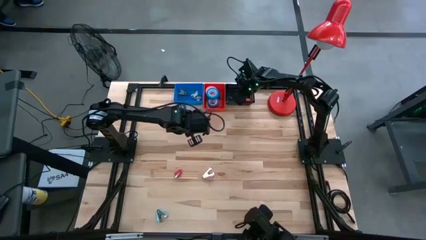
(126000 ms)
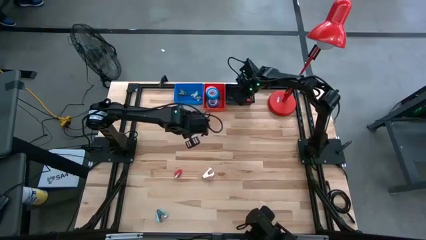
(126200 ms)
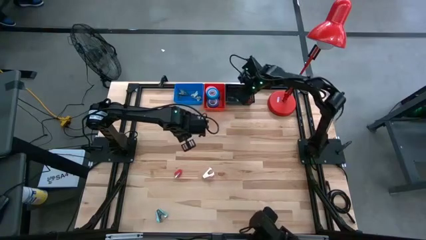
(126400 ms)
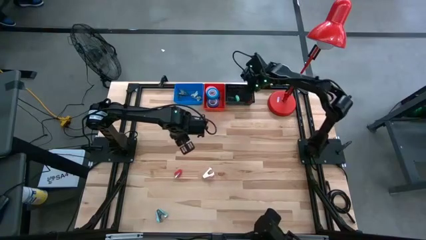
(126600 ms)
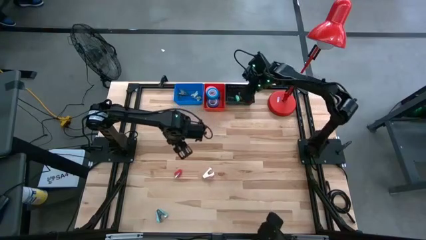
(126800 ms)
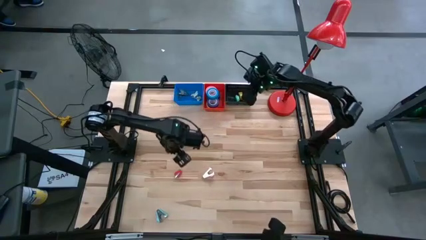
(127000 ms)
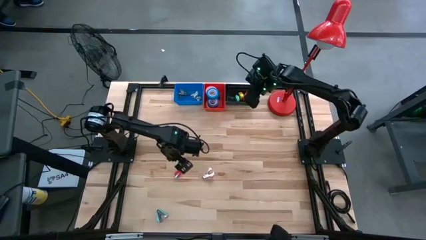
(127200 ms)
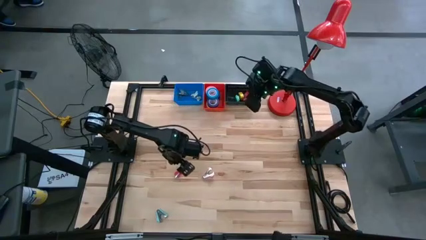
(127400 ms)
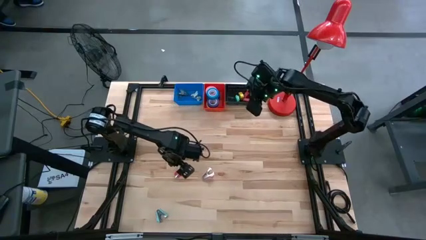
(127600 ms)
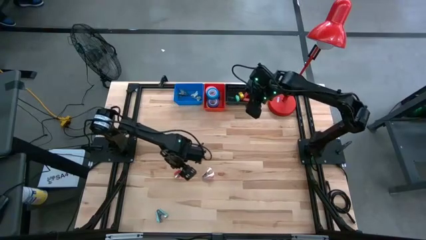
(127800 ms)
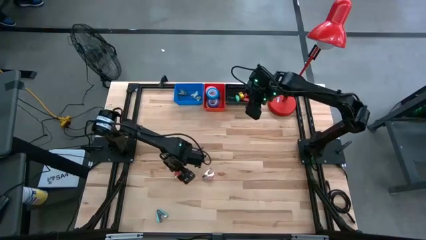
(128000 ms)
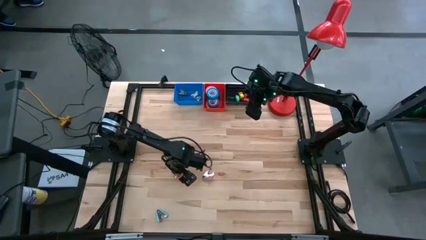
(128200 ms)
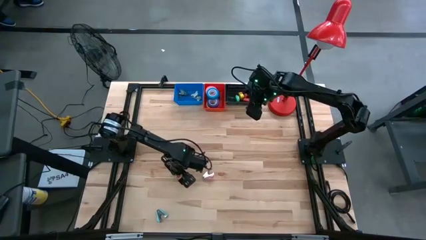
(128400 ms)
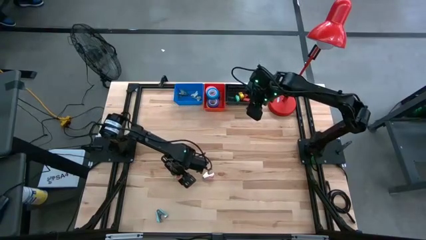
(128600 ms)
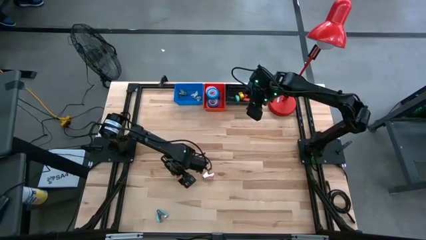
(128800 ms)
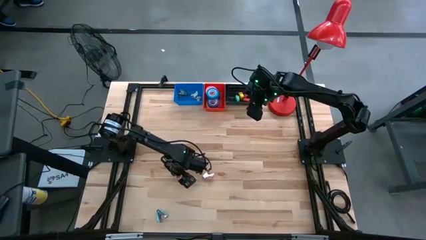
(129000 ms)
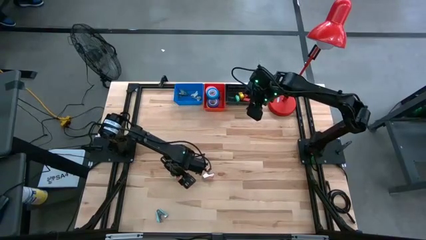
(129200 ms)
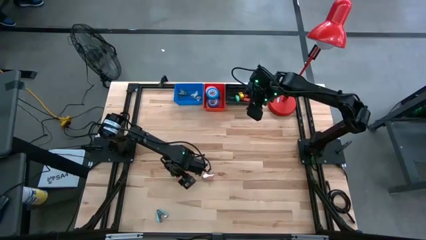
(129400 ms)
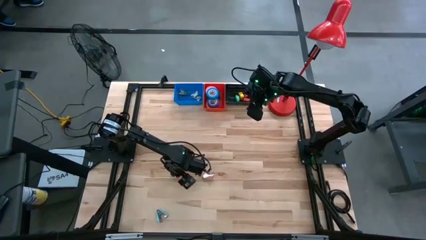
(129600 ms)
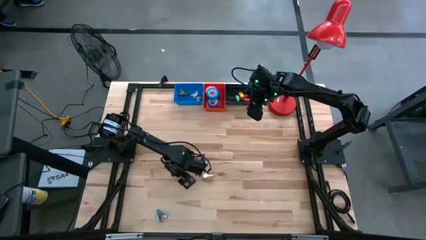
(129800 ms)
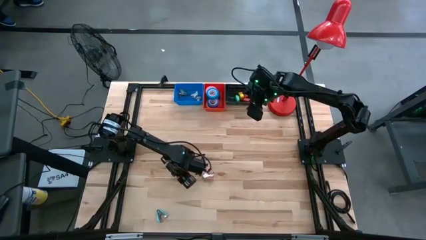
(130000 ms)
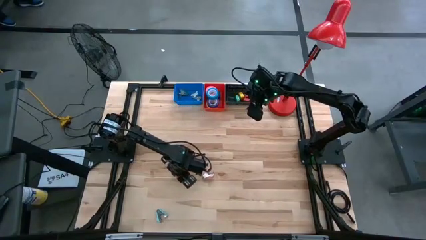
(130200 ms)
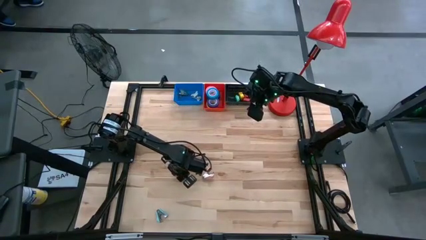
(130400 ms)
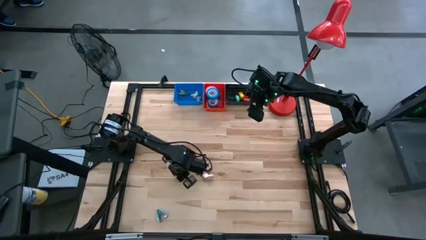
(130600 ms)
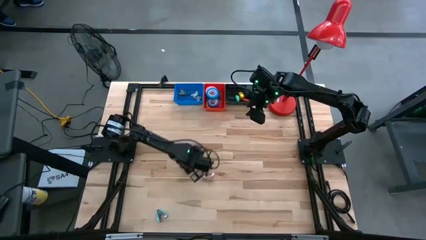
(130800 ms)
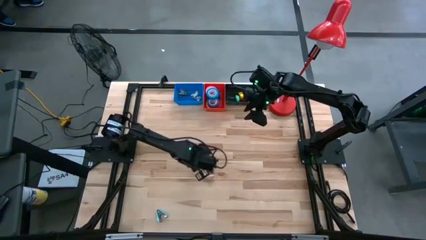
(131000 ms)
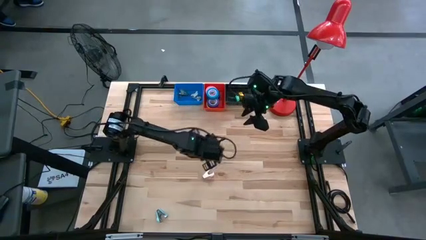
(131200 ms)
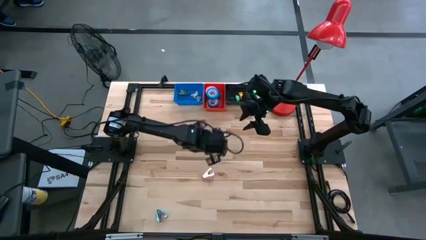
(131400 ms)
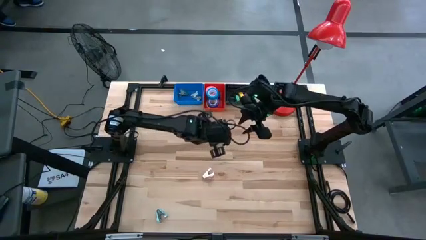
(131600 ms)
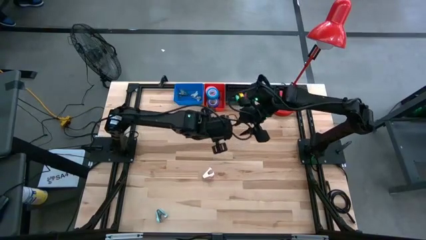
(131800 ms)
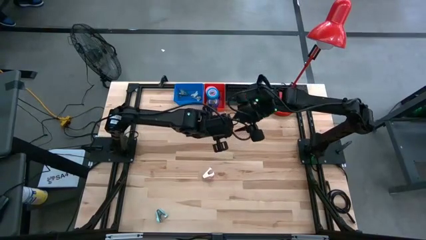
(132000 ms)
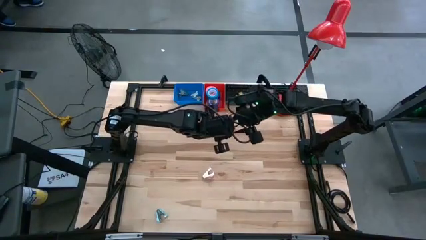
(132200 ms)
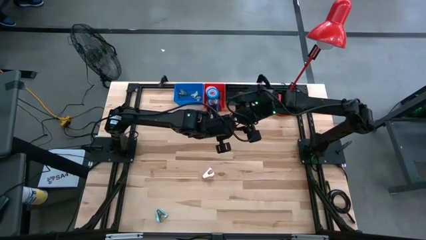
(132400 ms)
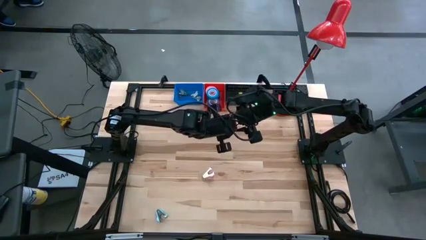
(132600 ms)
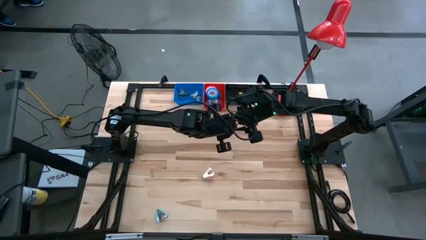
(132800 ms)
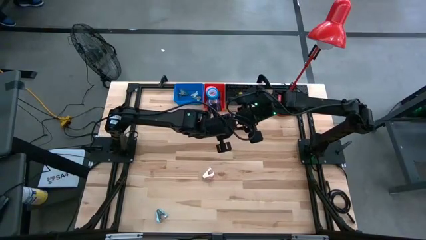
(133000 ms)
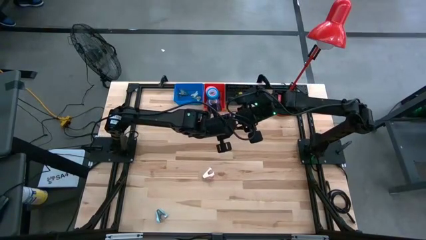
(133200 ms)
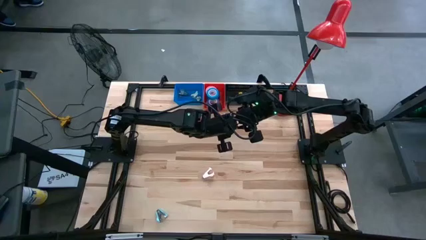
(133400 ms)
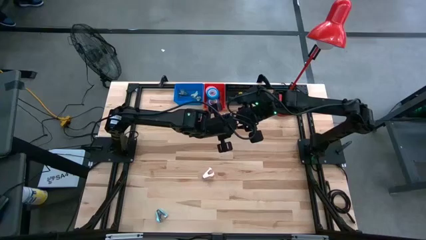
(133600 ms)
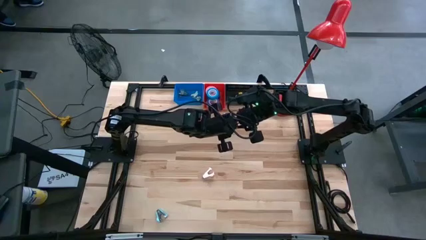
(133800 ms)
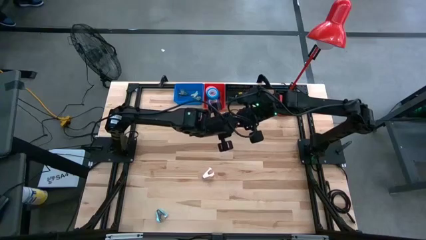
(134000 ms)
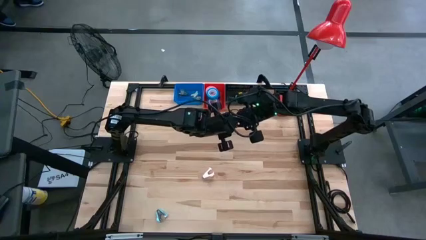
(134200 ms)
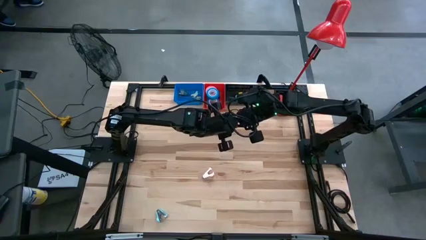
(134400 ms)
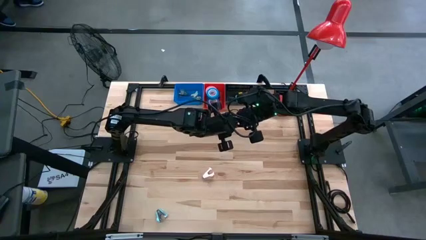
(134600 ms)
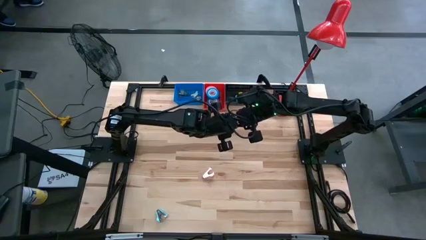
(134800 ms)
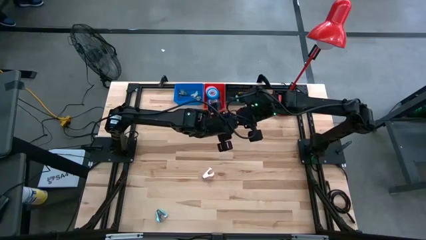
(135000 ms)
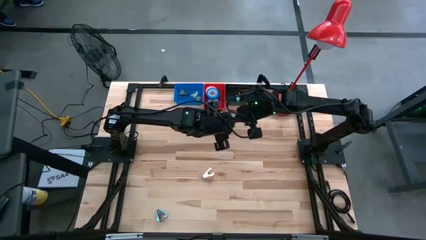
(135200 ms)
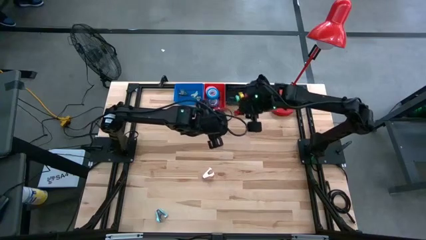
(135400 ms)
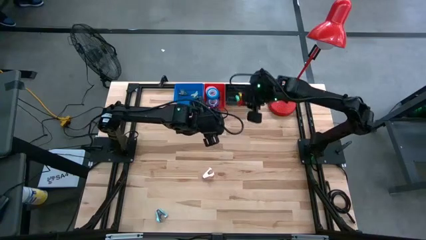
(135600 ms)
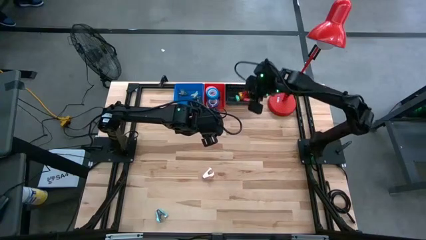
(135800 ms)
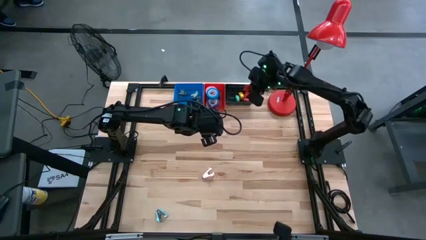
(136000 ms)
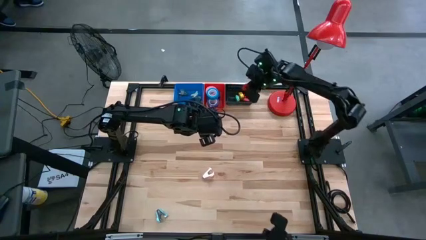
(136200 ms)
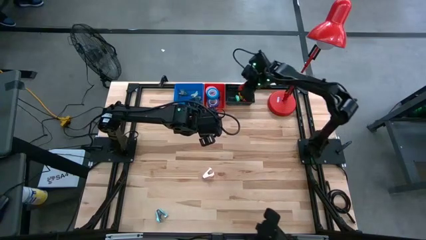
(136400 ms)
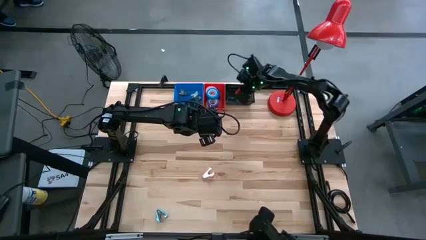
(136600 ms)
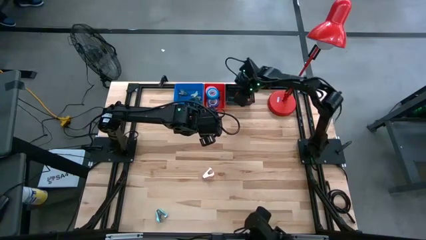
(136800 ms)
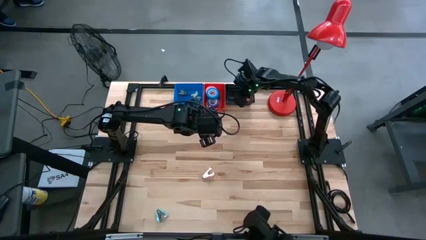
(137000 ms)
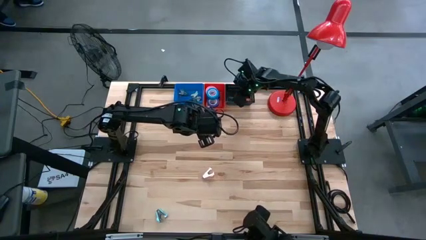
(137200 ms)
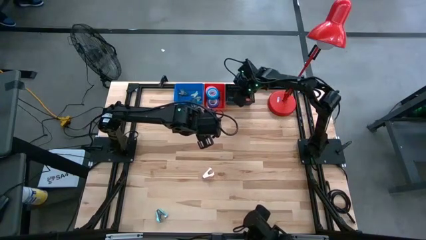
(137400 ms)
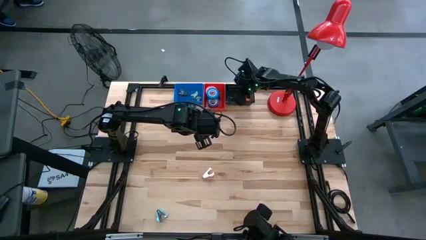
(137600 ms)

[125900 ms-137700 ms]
Task: Pick and place Stapler, Stapler remover, tape
Put the red stapler into the black basket

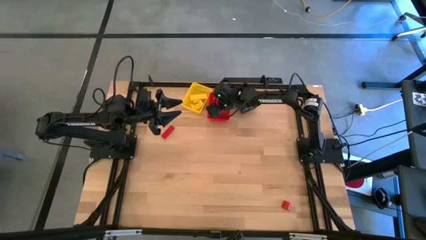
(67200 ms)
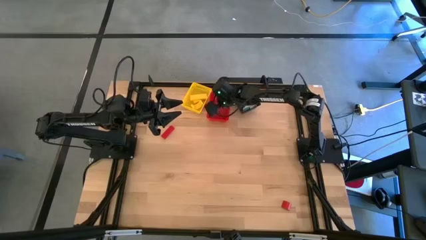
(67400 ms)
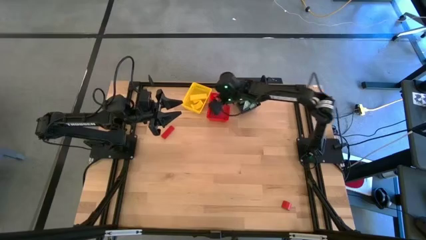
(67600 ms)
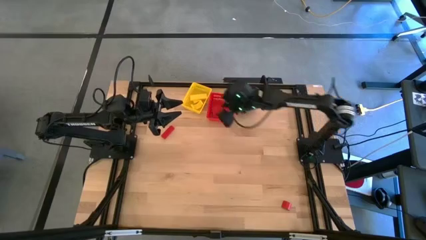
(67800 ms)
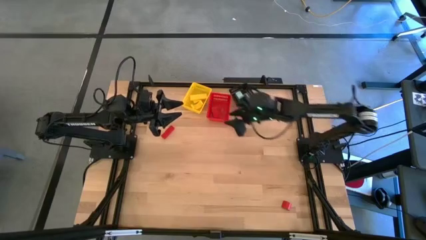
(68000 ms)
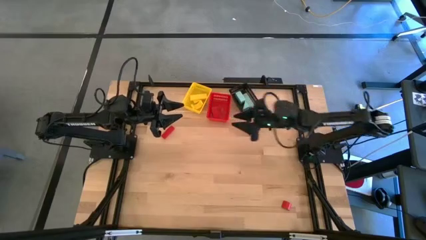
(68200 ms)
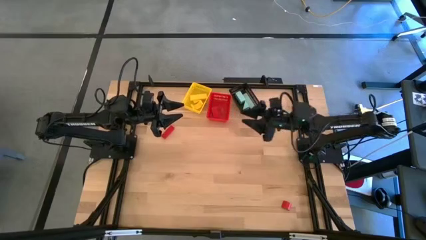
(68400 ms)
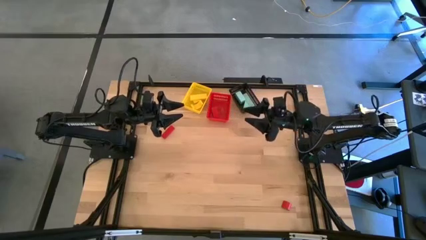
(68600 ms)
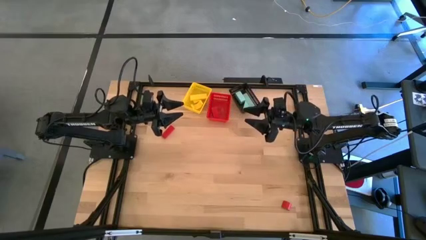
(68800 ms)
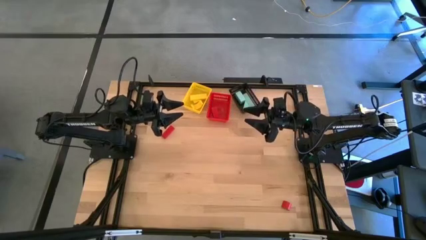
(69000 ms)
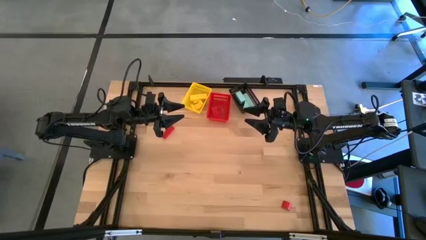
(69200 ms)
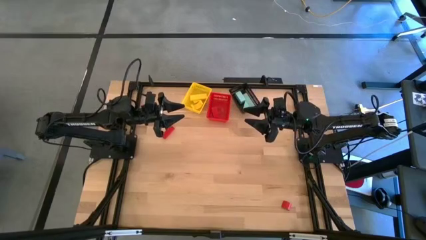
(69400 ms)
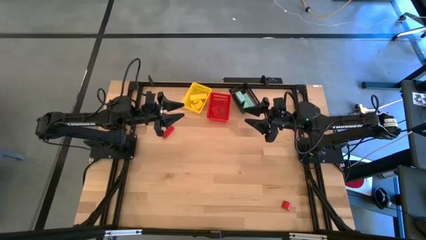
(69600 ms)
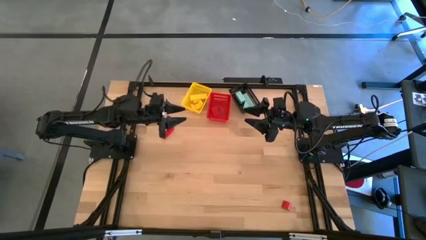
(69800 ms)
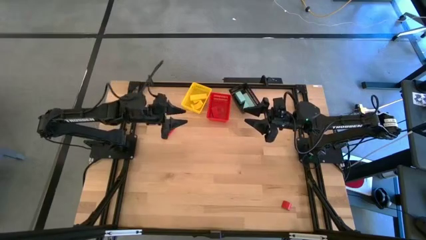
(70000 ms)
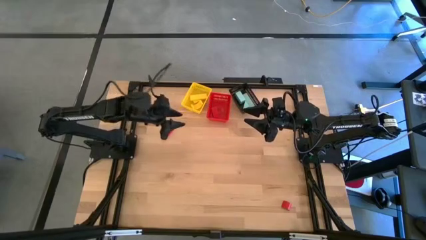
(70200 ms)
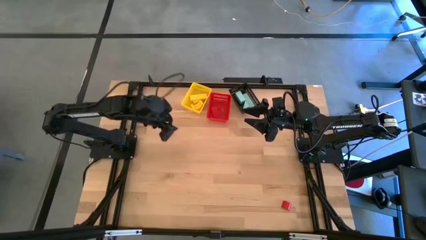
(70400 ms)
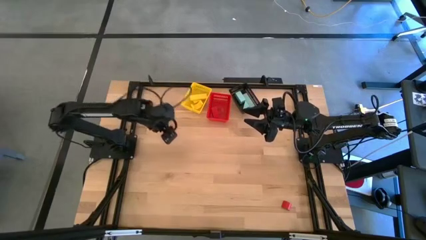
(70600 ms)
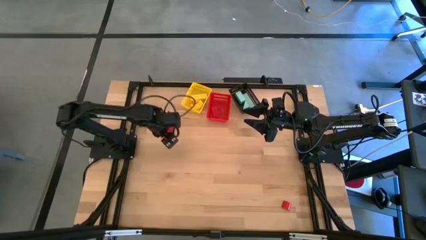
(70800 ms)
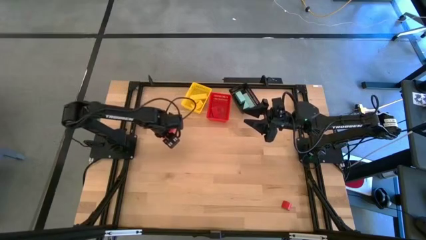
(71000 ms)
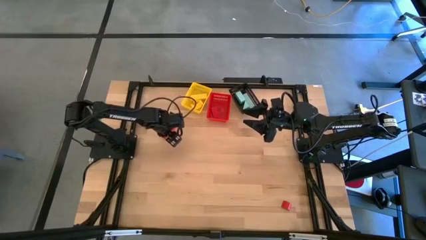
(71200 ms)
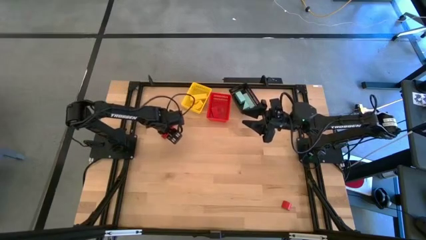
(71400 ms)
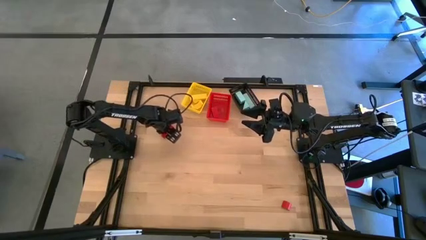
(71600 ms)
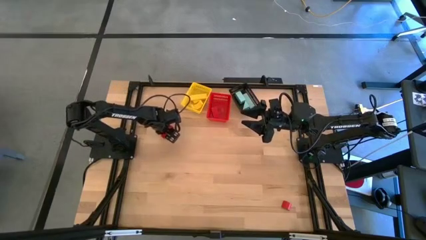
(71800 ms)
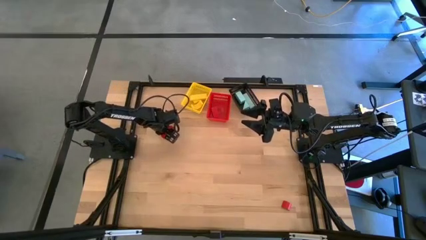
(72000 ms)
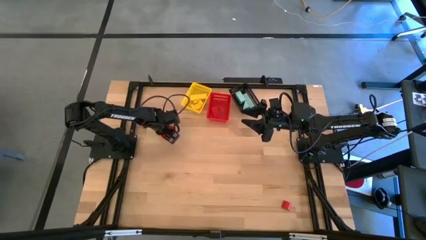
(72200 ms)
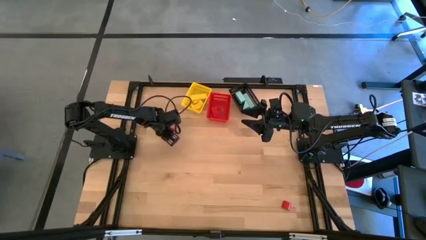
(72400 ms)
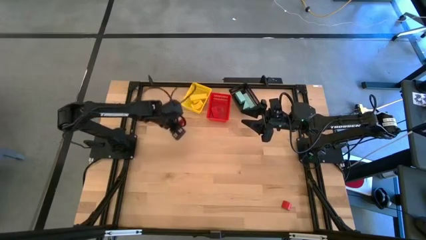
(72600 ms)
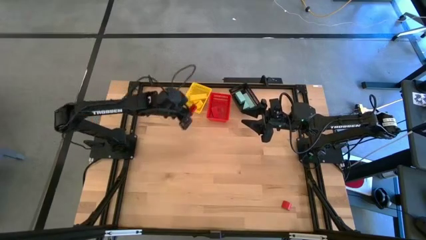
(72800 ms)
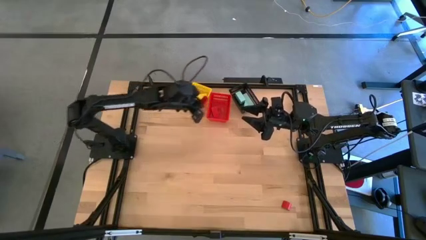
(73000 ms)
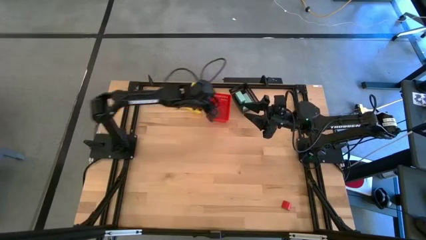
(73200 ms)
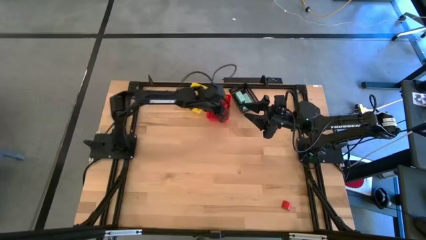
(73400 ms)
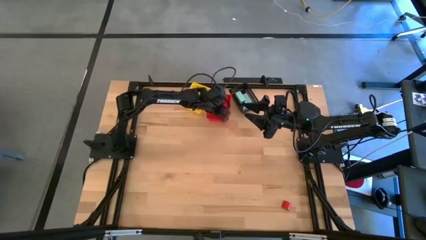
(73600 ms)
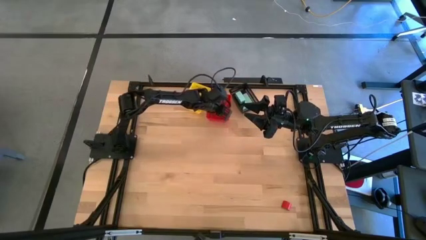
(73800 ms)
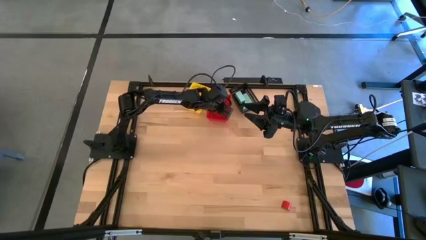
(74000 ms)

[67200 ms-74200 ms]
Task: Sort & place blocks by color
Put the top red block into the red bin
